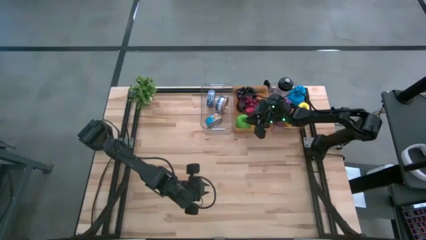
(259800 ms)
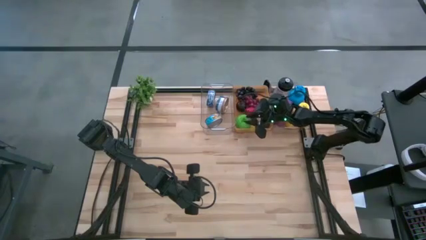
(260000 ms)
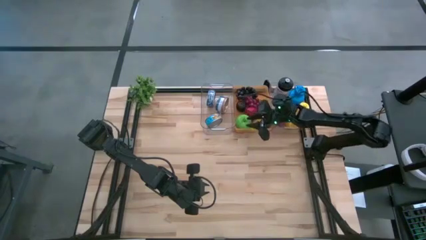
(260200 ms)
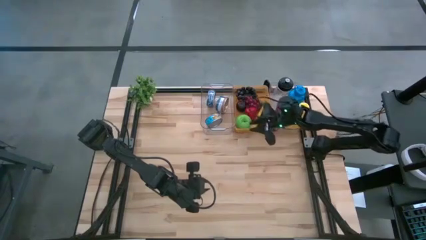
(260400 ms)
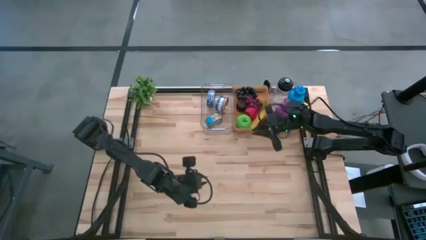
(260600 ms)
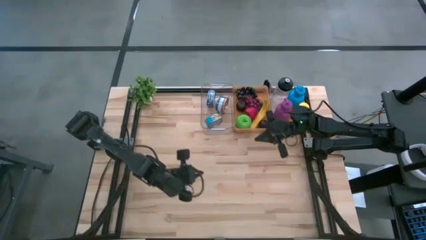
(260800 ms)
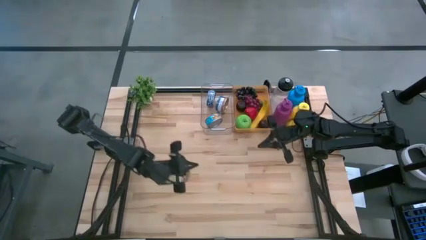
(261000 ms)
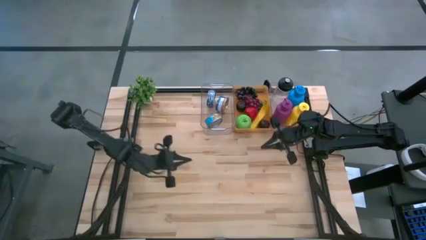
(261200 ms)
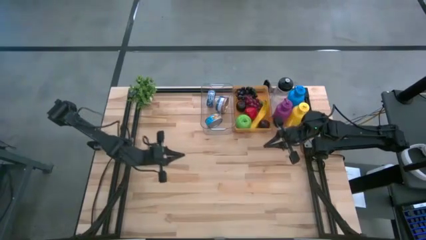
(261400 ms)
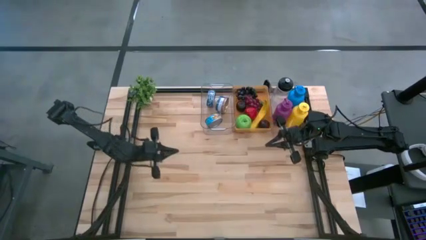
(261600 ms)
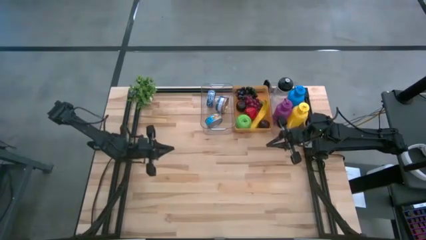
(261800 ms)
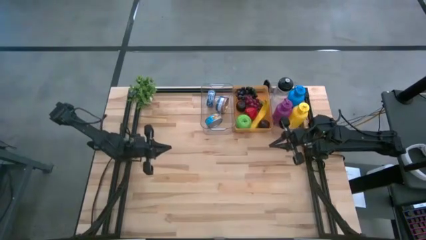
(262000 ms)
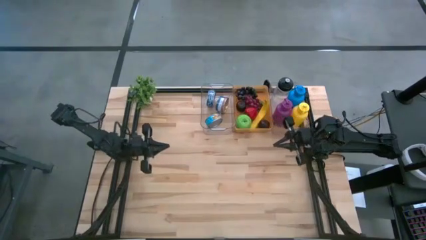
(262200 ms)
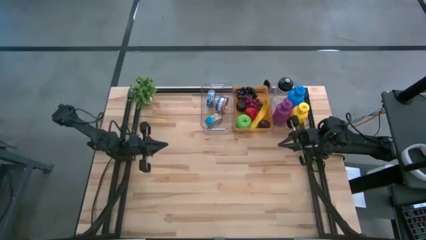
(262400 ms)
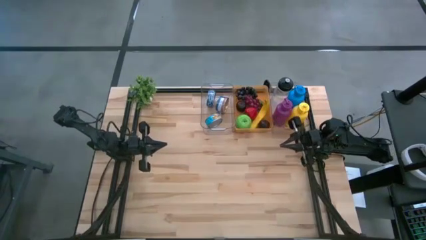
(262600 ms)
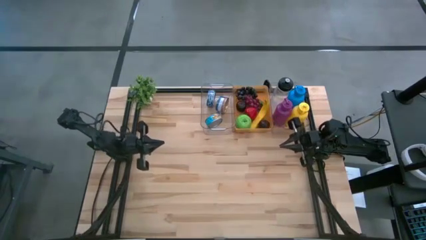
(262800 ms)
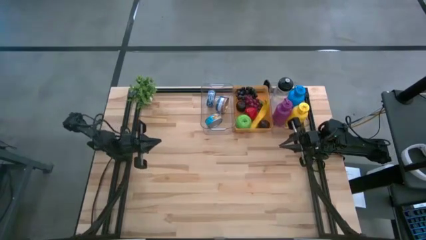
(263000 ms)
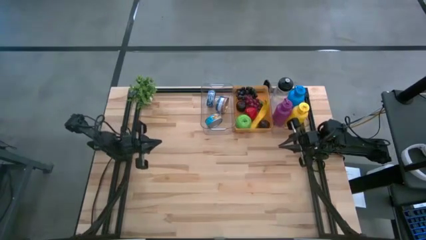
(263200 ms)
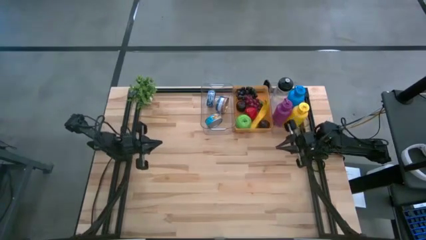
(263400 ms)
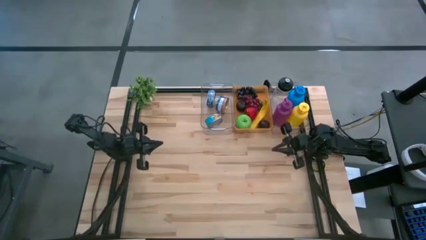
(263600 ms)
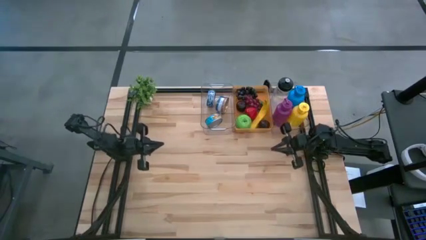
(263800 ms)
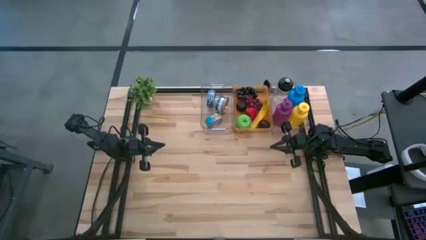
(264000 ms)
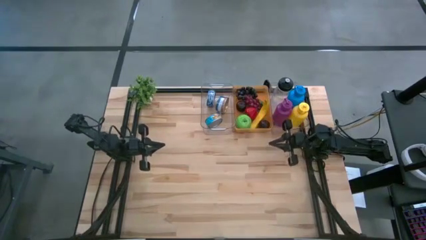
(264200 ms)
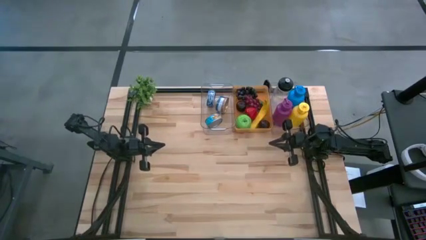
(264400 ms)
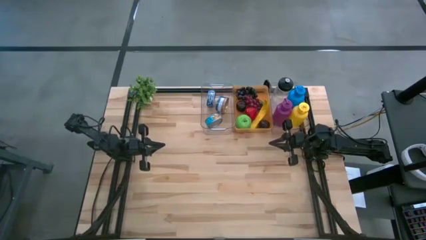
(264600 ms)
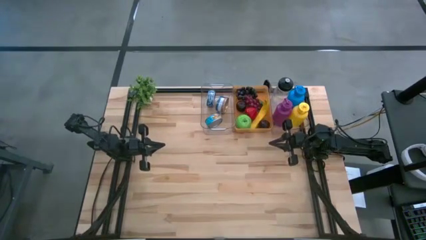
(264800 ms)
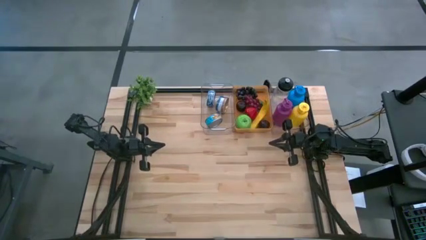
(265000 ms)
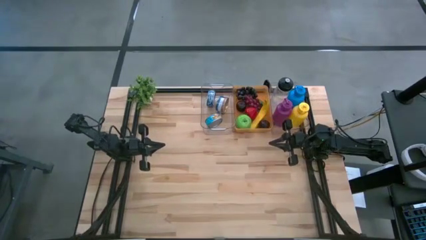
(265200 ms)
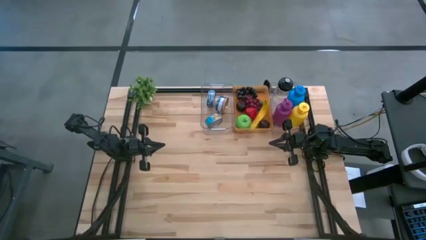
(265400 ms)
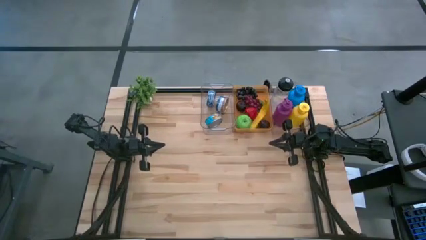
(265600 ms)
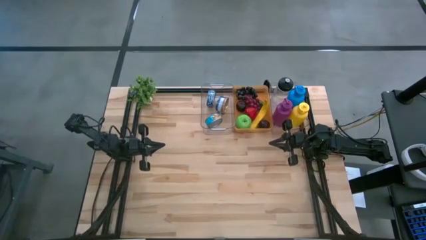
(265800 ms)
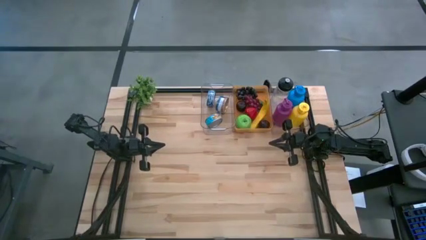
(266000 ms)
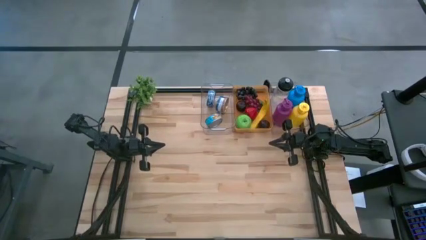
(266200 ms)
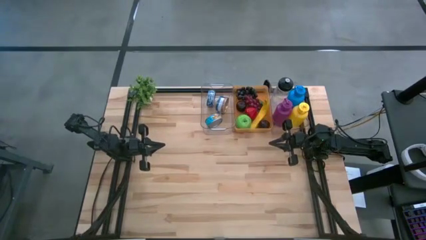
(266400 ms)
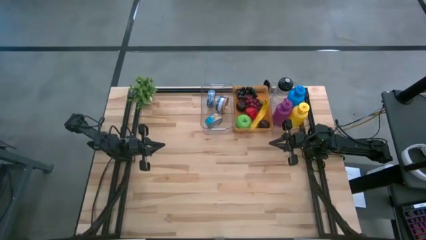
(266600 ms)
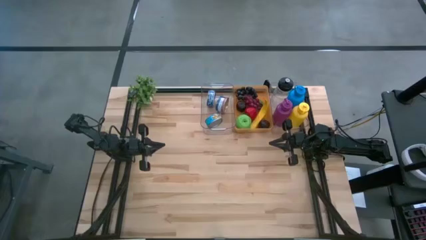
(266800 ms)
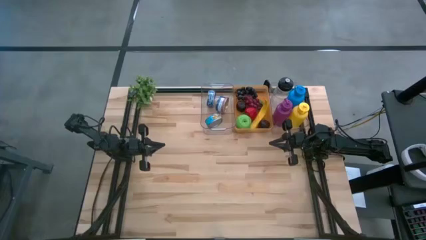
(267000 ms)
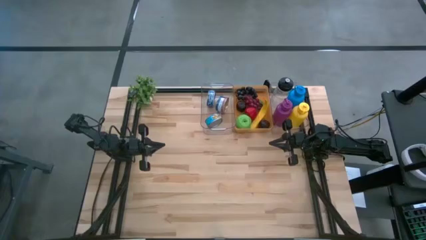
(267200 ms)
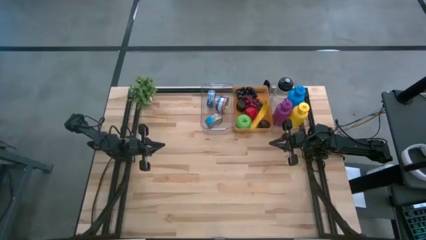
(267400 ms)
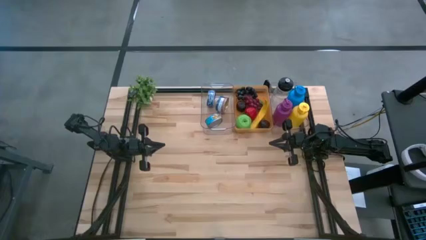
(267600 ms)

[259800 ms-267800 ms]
Task: Pick & Place Food Item
Return to Home Position

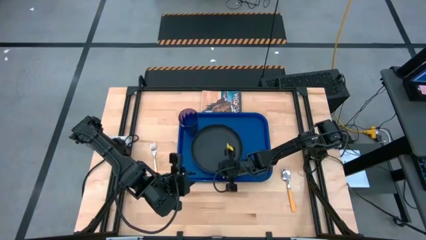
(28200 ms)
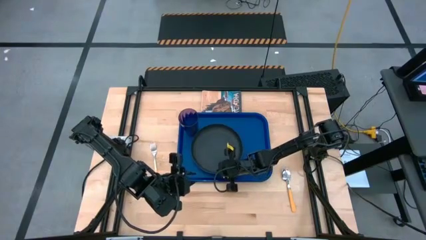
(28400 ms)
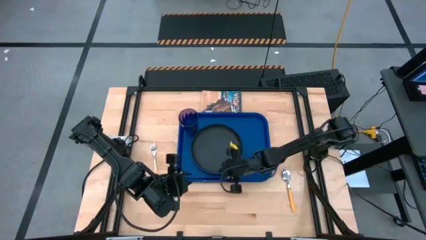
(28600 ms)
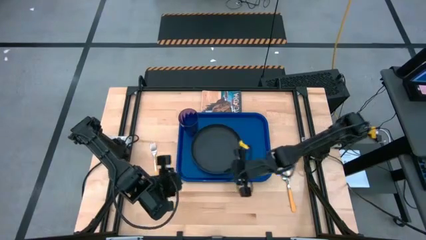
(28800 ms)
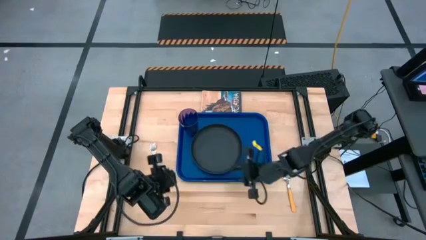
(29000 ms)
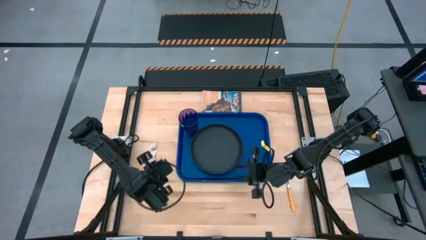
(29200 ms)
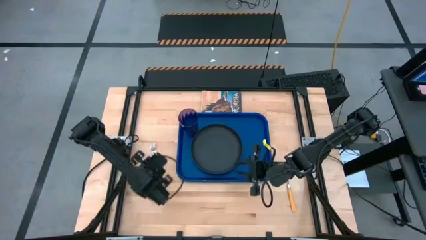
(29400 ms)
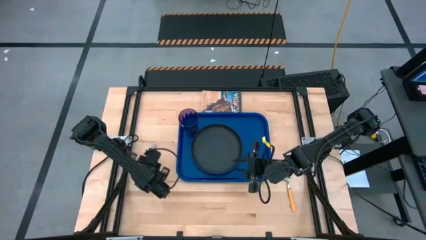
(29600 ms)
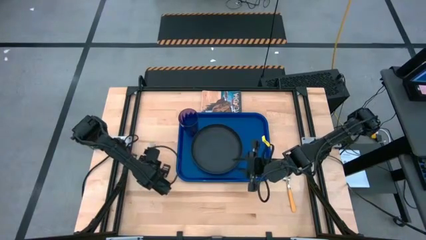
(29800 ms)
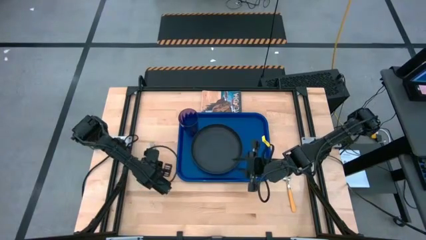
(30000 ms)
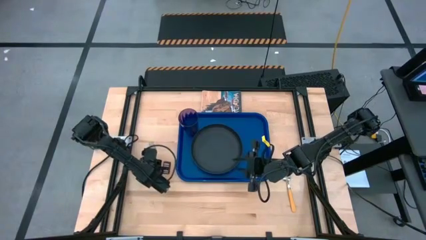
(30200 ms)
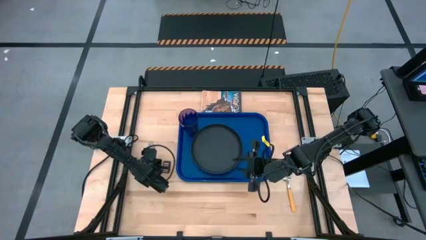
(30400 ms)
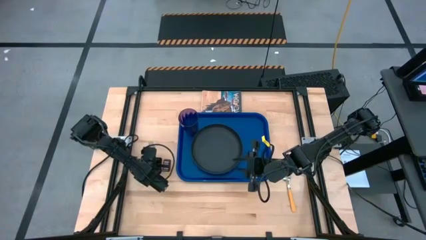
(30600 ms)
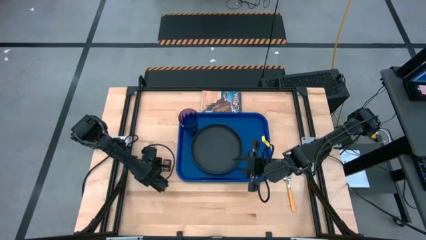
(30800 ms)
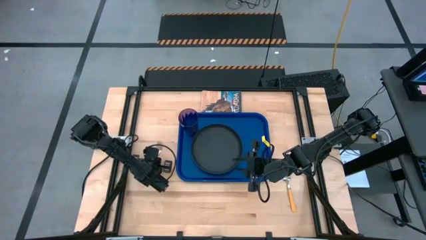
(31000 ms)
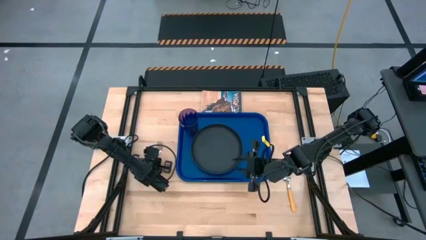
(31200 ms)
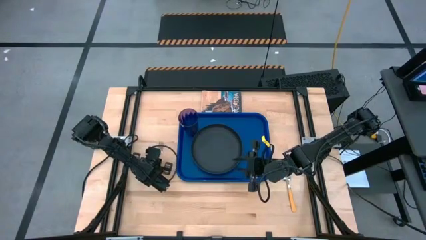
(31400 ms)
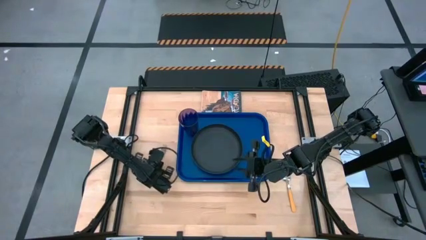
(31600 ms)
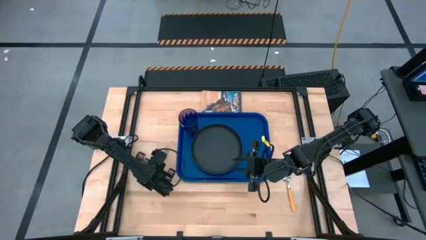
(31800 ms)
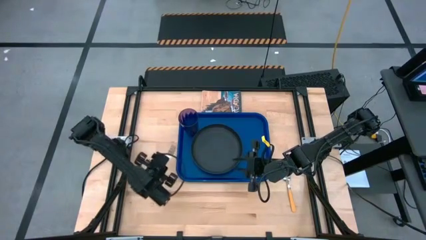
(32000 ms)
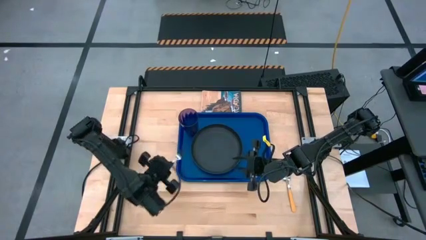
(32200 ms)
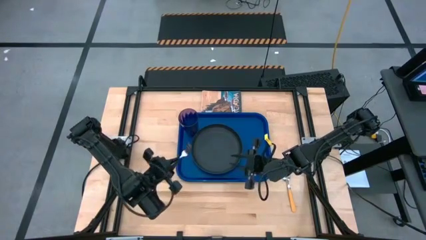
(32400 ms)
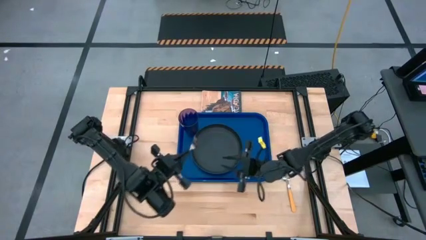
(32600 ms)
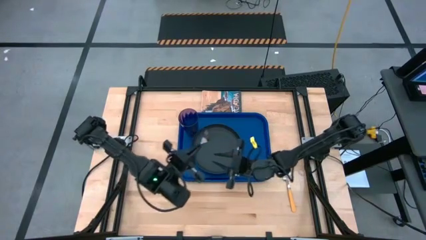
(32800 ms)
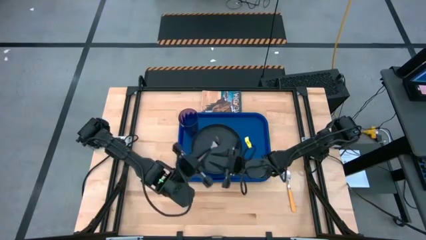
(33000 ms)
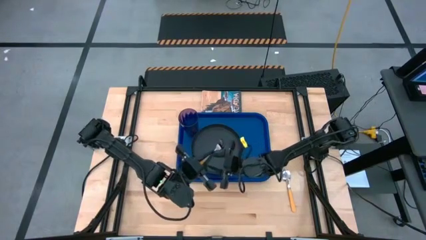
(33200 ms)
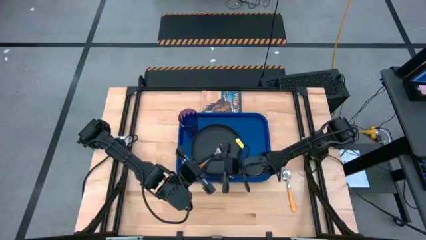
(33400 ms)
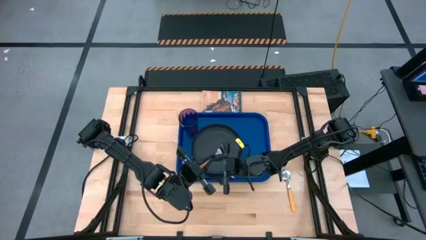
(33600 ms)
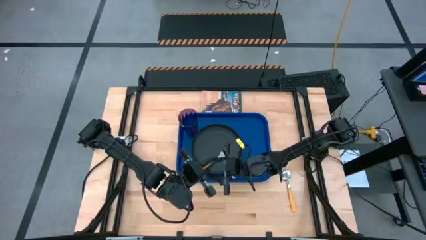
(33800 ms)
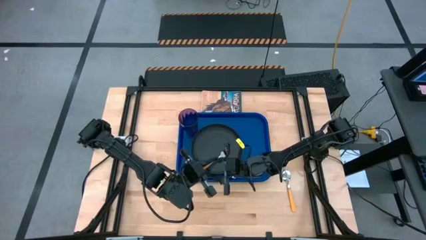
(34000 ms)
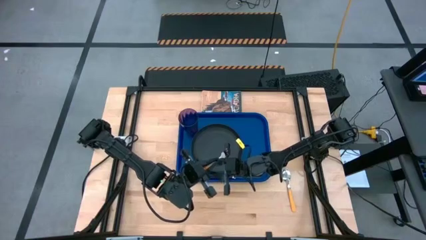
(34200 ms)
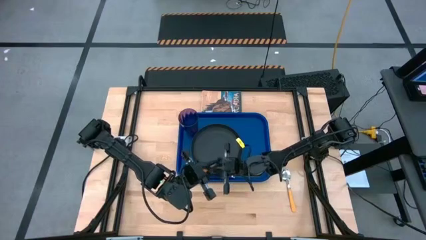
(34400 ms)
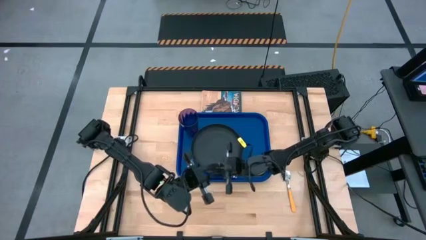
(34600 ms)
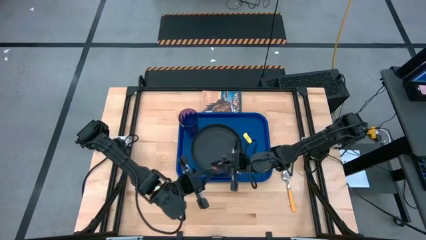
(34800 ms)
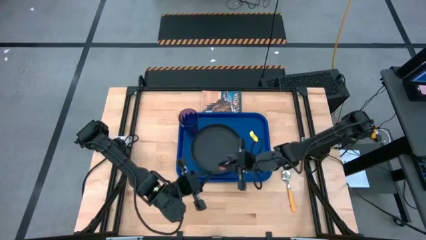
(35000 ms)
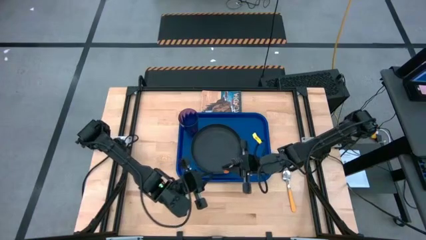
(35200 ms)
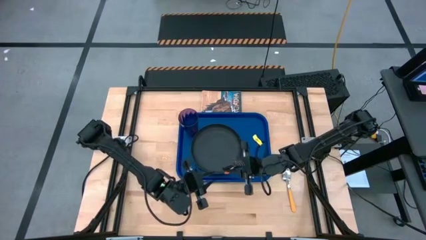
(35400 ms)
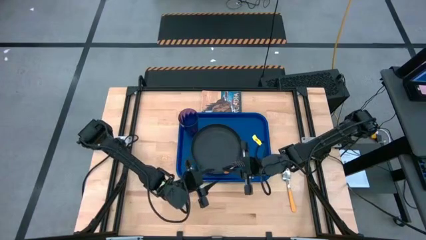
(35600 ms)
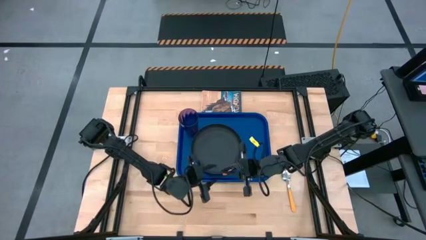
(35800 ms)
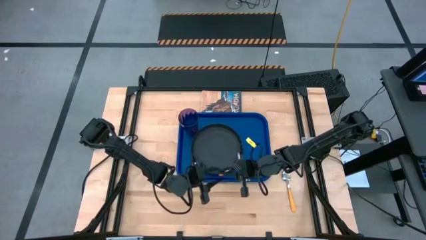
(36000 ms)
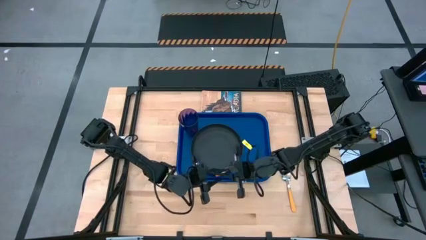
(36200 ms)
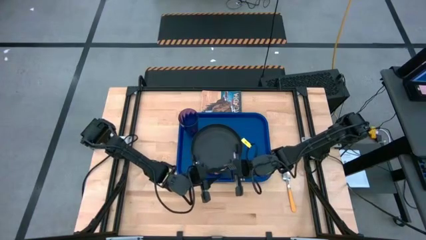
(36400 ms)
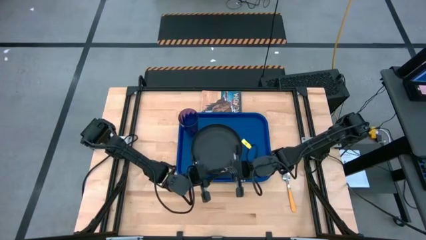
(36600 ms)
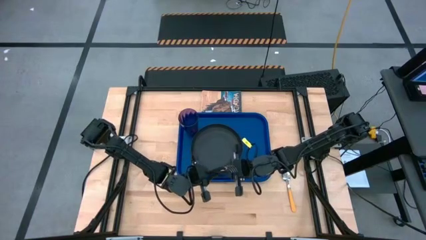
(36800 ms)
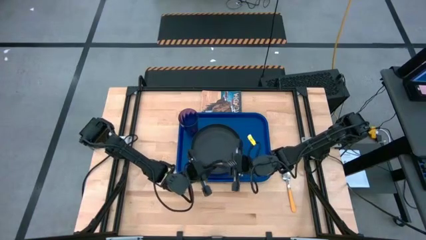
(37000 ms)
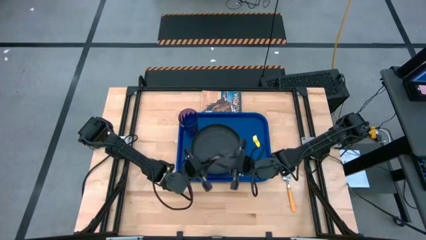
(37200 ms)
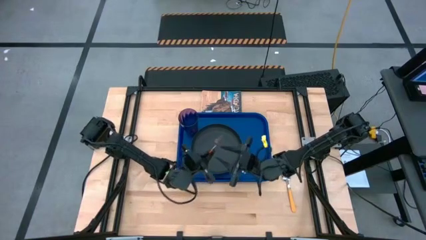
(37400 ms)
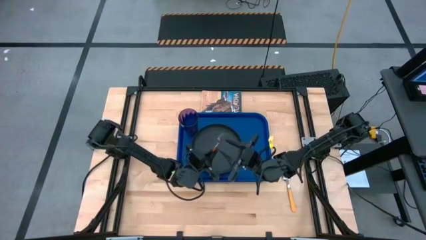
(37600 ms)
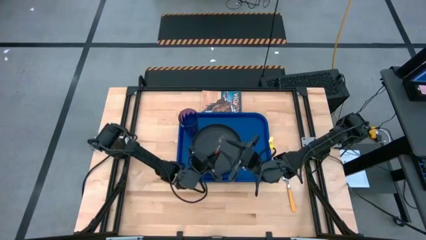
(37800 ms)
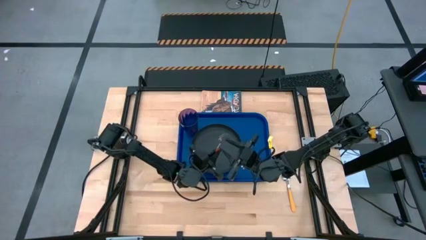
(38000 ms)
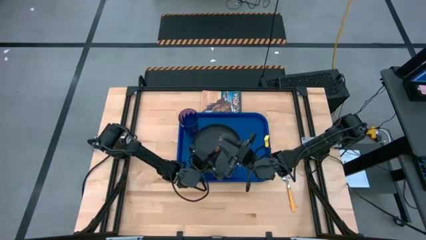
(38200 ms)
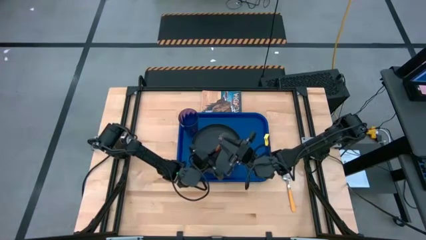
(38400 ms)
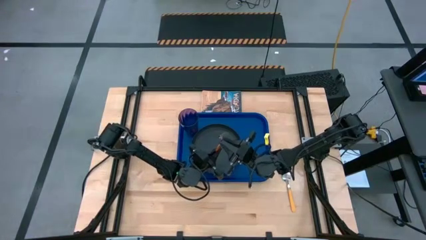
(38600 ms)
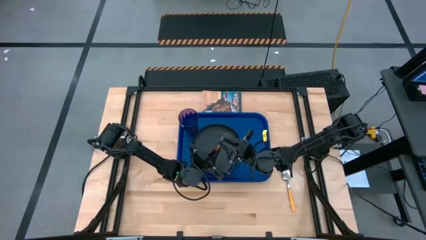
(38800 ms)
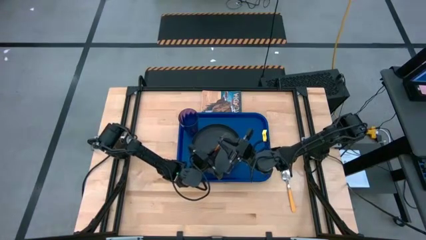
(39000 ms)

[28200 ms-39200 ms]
Task: Pick and place plate/cup/fork/spoon on tray
Put the orange fork on the blue serving tray to the right of the black black plate
